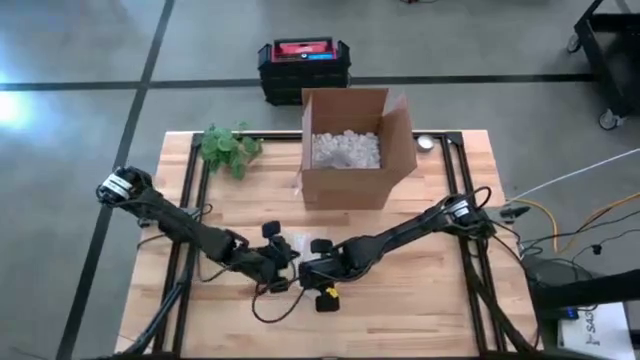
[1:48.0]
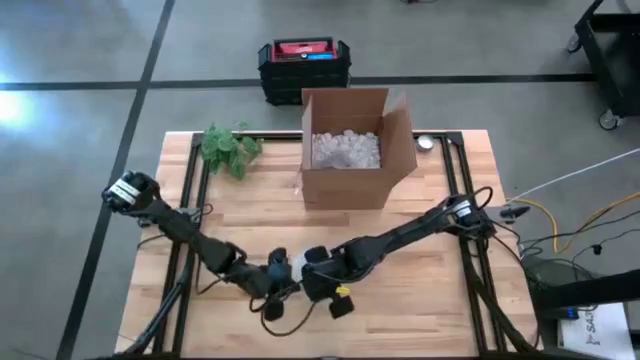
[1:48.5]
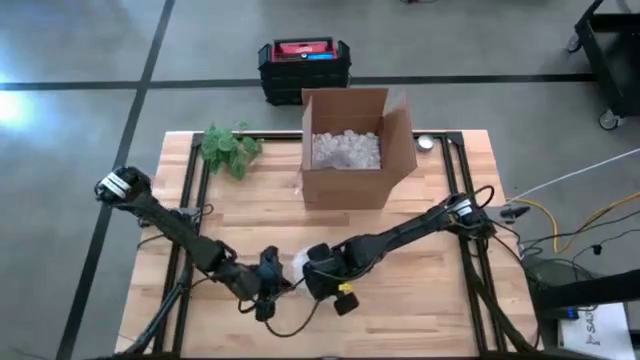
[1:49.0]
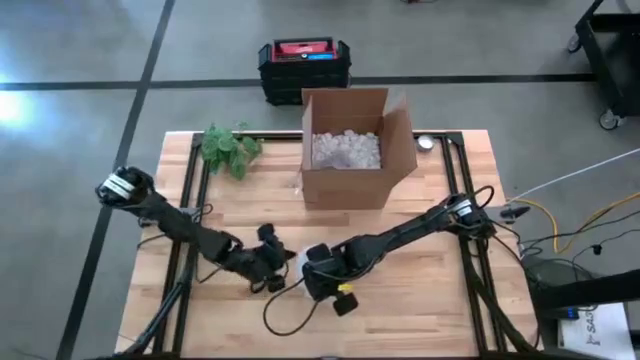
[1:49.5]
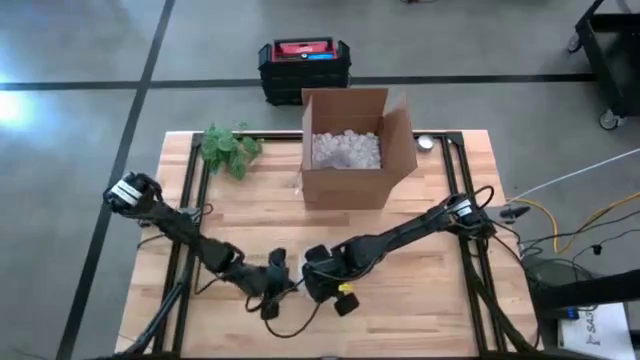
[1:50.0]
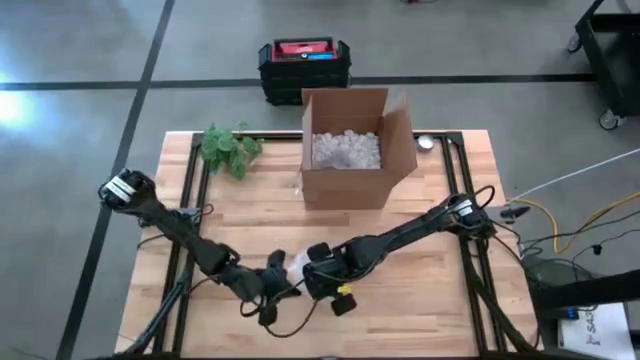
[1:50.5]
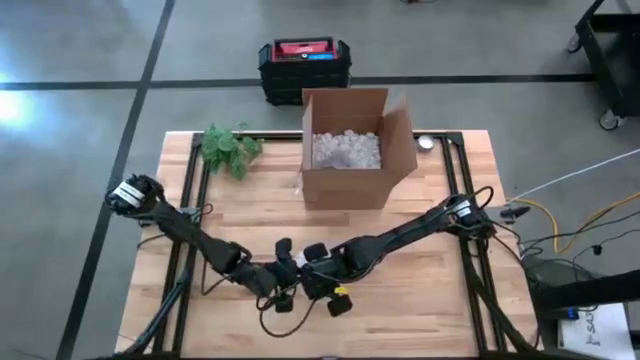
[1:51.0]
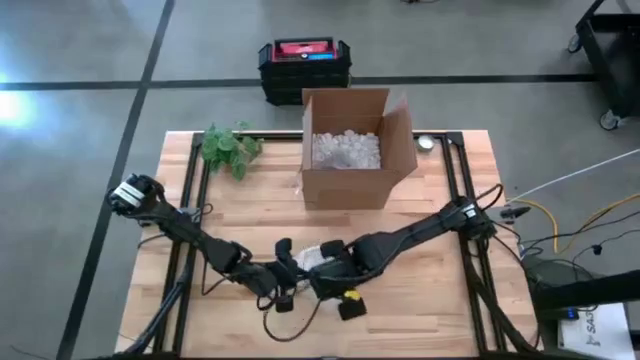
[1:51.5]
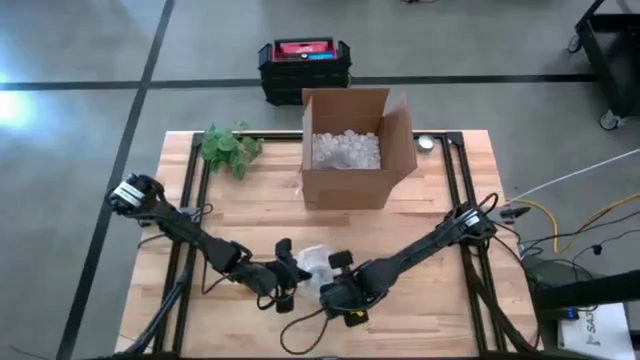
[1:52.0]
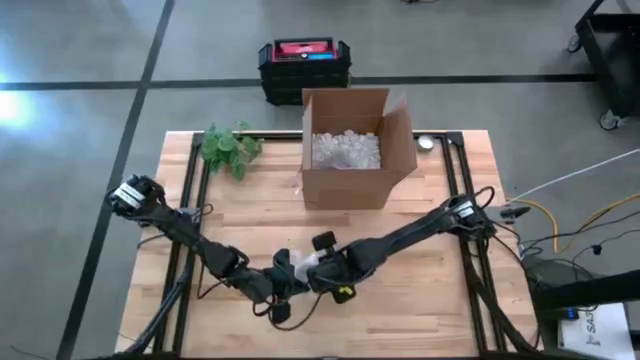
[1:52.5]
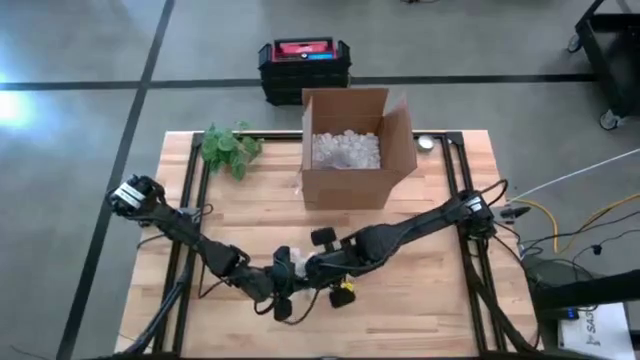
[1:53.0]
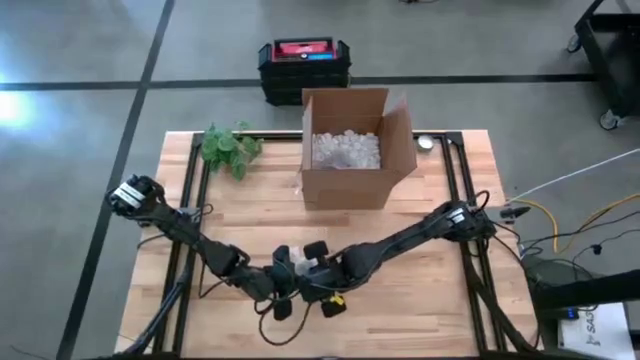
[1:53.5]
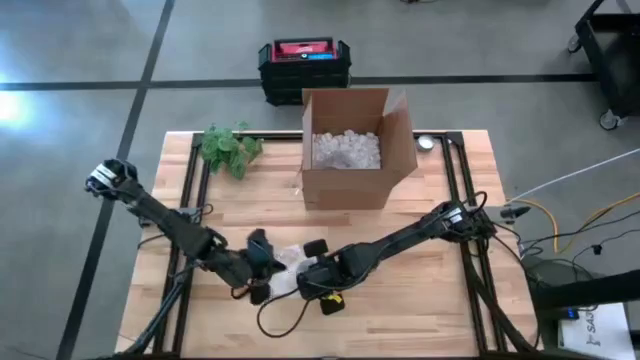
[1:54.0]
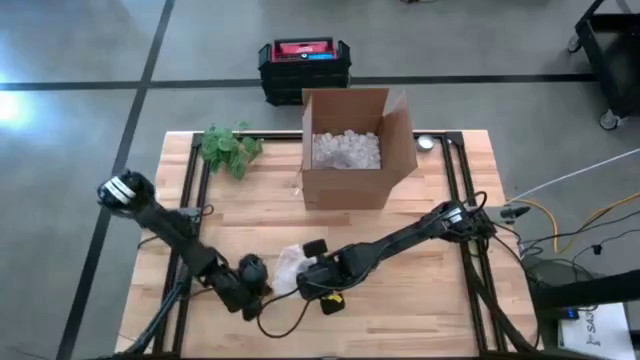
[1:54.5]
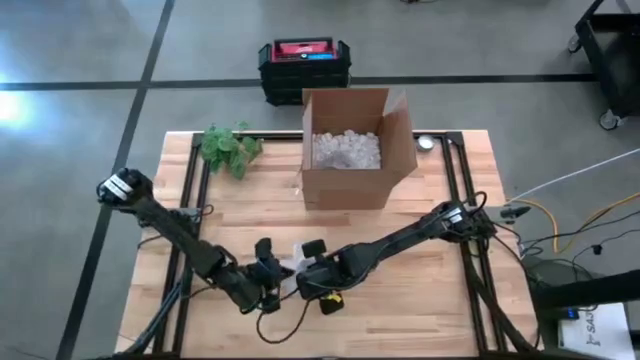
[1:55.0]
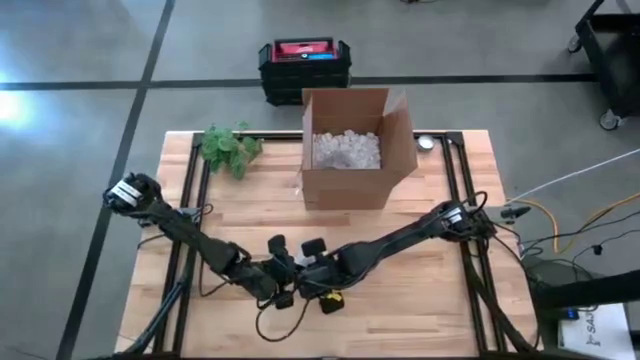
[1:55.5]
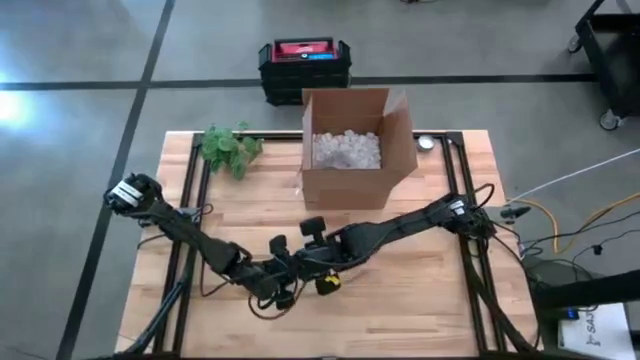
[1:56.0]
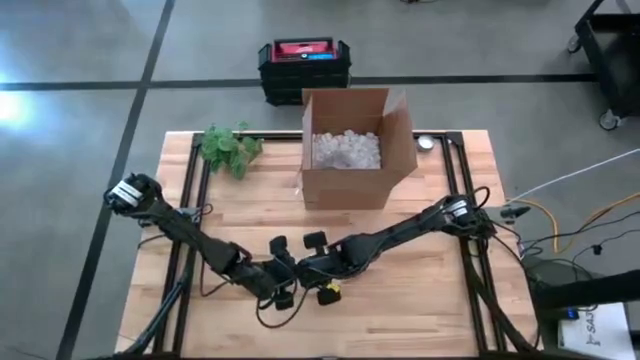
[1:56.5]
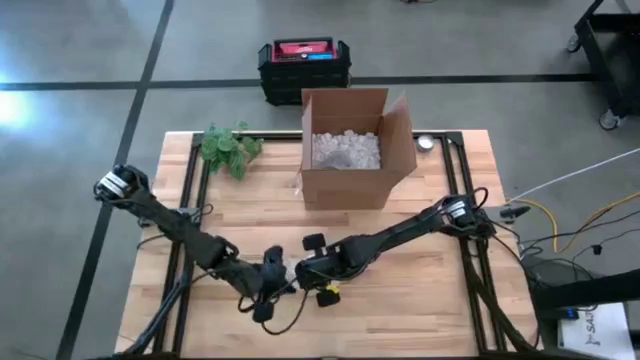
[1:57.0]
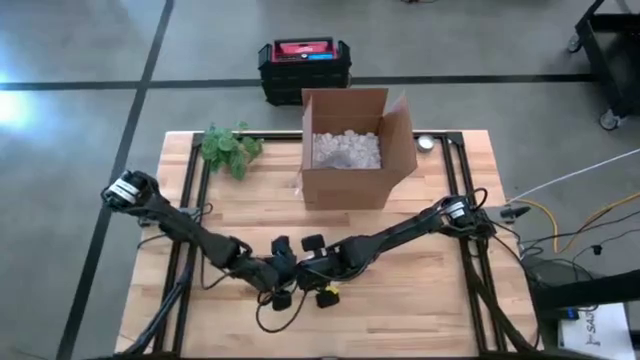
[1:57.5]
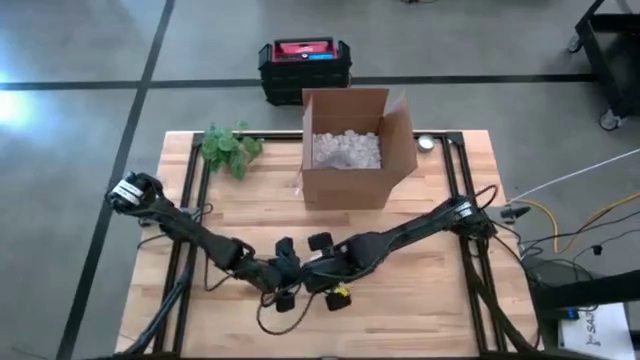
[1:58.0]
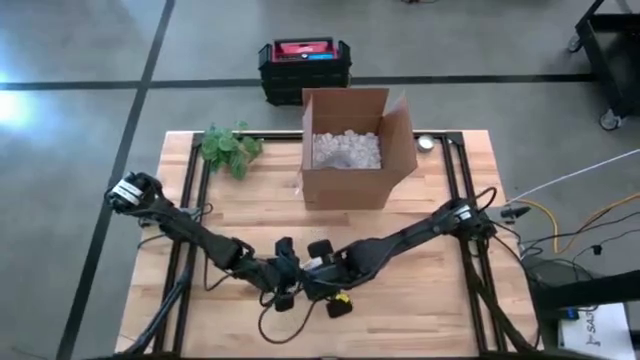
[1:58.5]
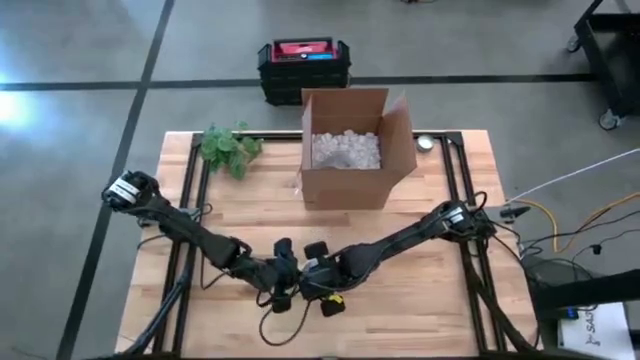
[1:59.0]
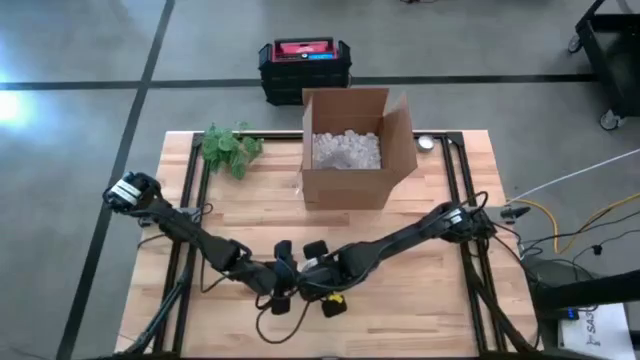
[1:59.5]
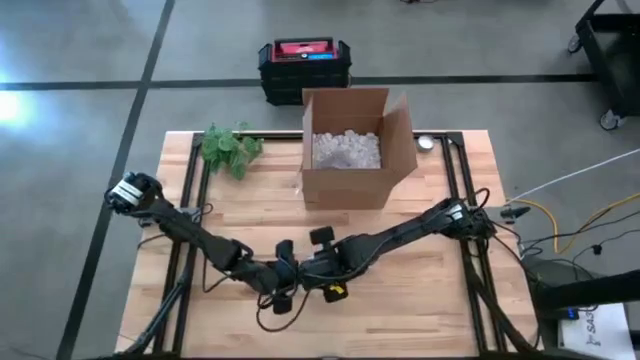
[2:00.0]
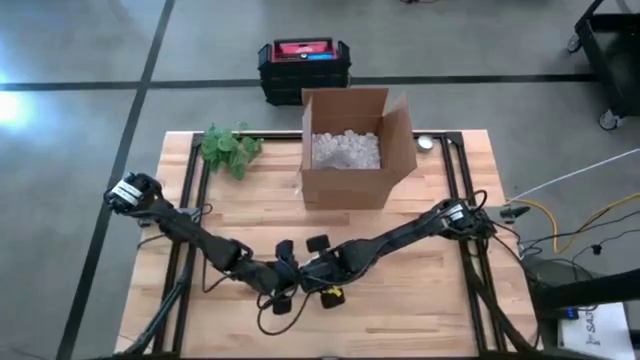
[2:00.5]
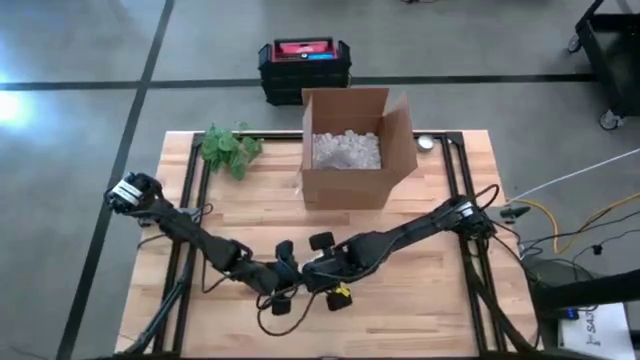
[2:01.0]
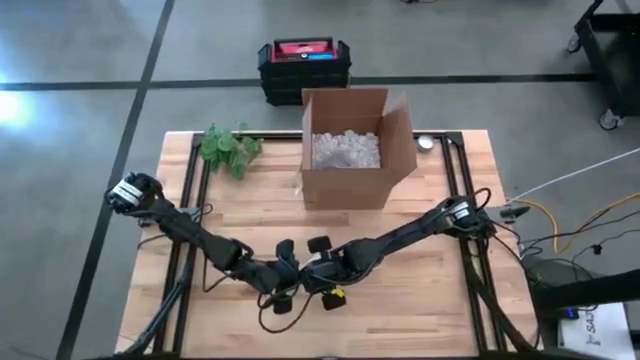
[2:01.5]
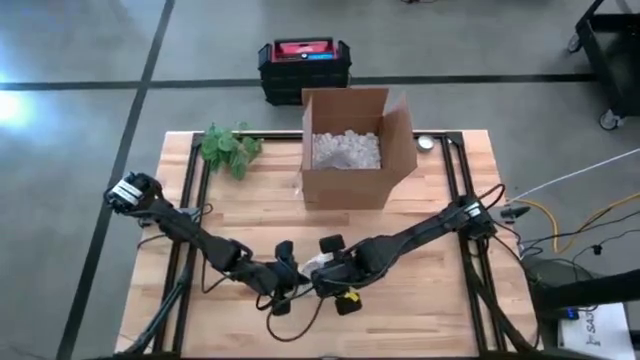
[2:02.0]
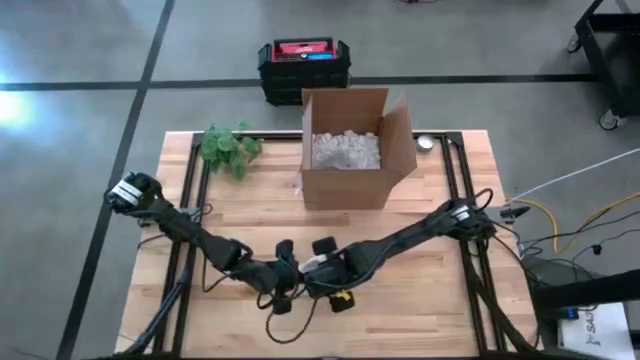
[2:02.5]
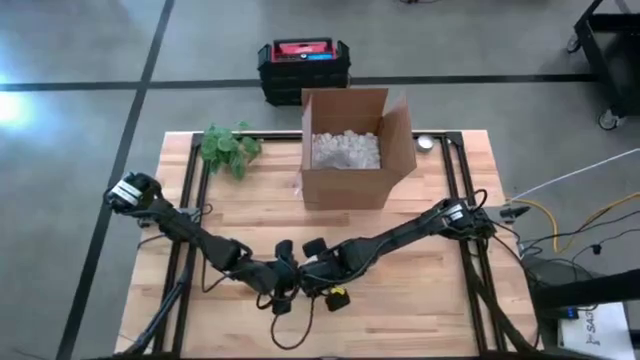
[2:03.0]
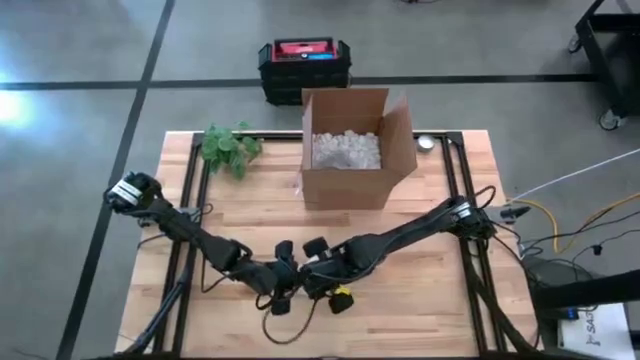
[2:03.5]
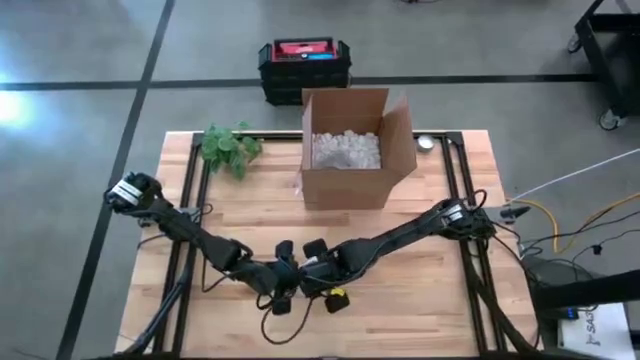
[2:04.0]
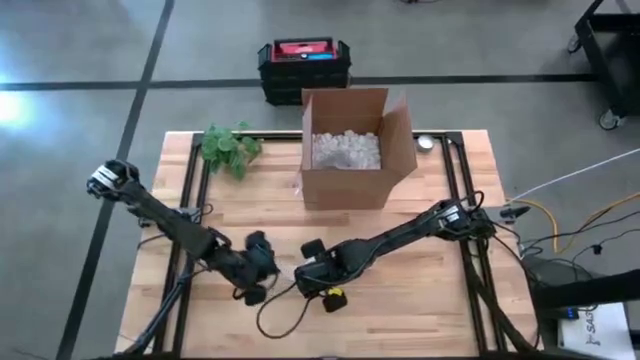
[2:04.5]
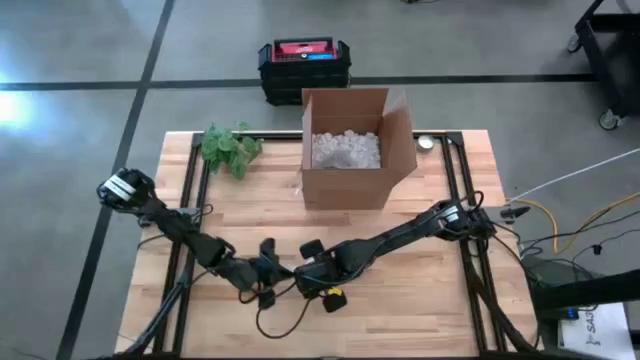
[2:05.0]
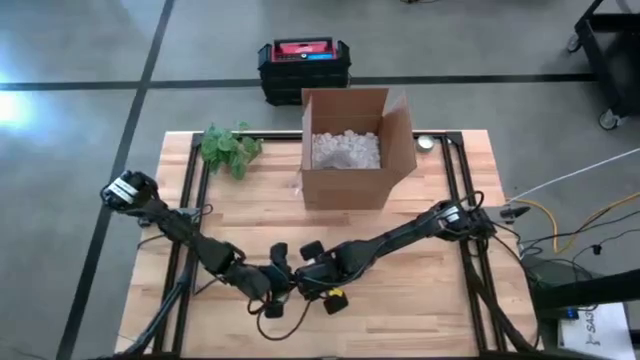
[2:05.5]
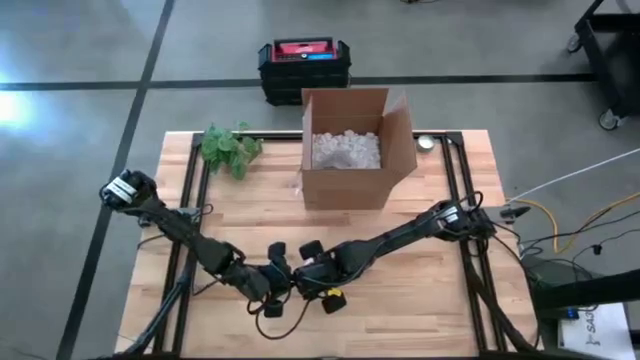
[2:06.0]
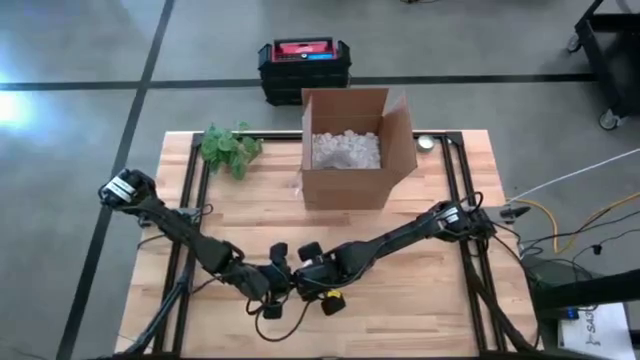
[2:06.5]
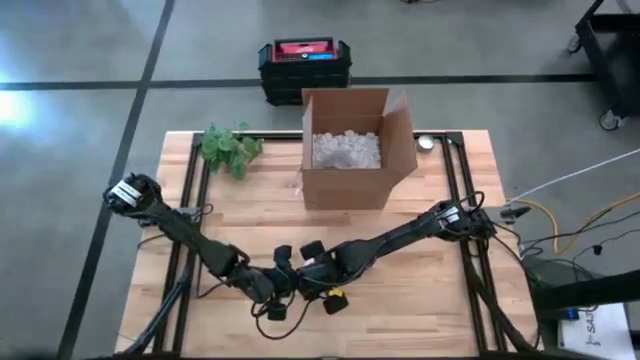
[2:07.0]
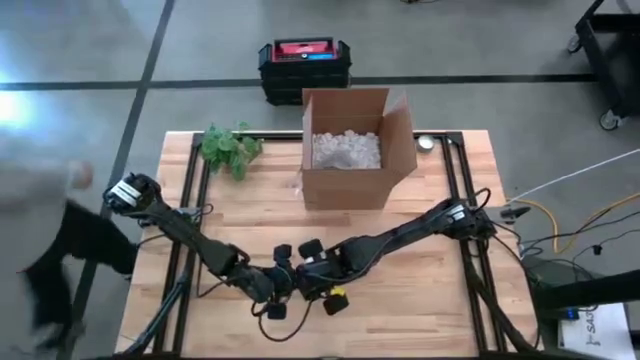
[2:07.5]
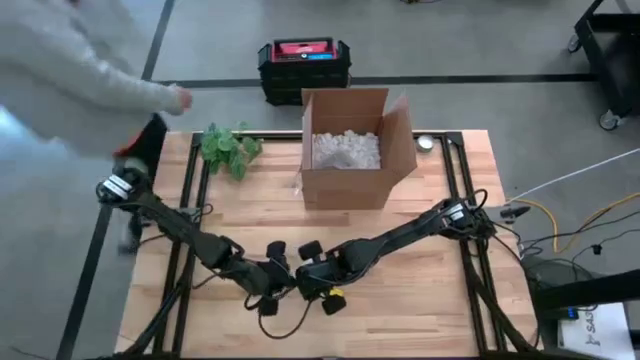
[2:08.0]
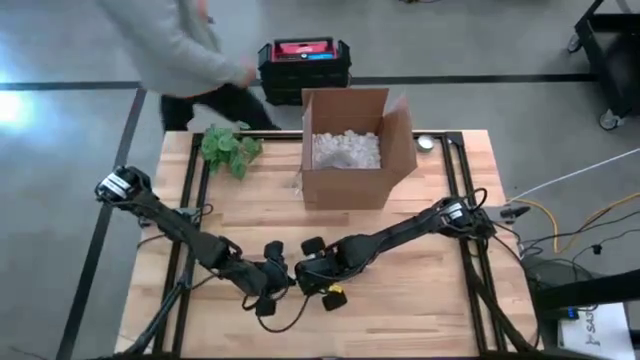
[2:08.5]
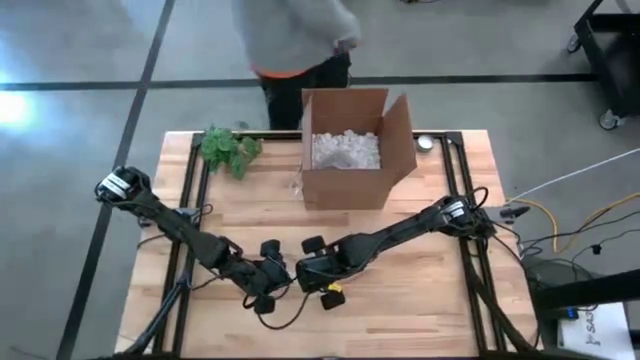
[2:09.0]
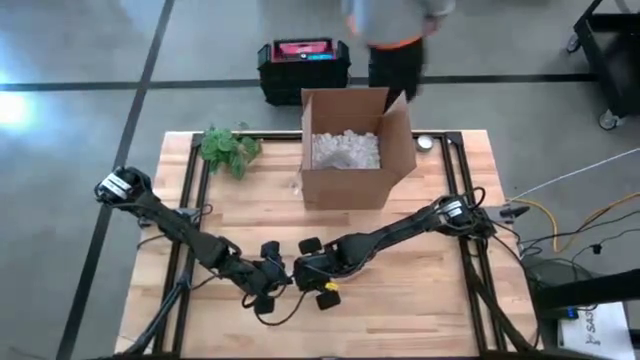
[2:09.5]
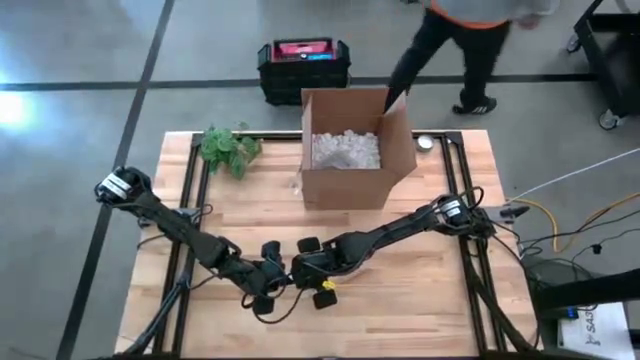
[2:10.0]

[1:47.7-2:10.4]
Task: wrap mug
Wrap the yellow mug with bubble wrap
